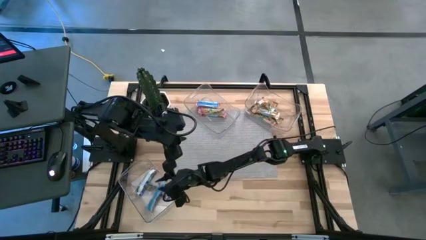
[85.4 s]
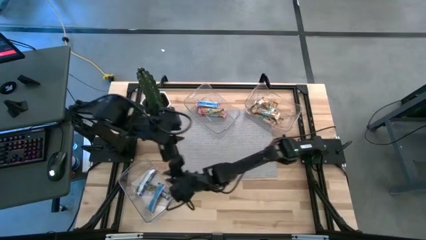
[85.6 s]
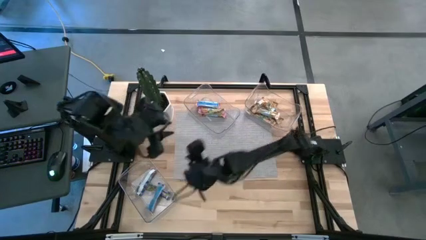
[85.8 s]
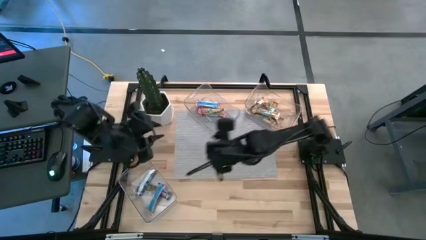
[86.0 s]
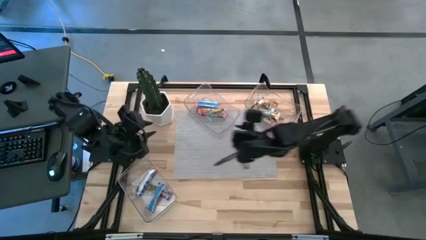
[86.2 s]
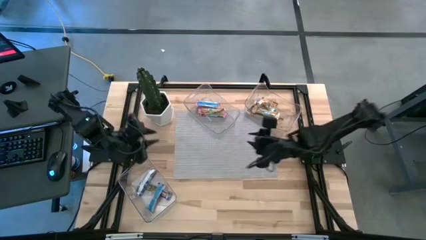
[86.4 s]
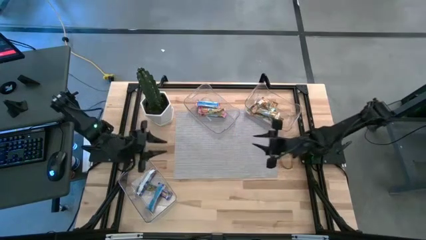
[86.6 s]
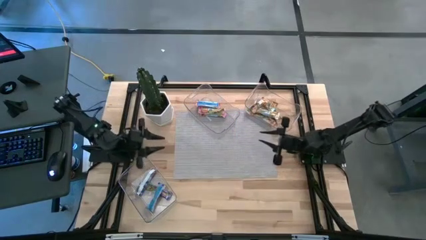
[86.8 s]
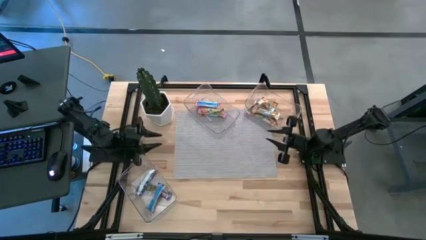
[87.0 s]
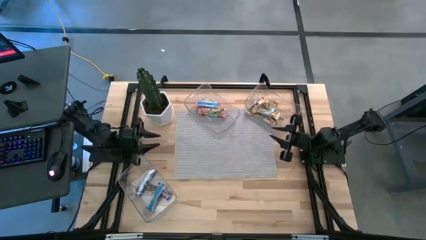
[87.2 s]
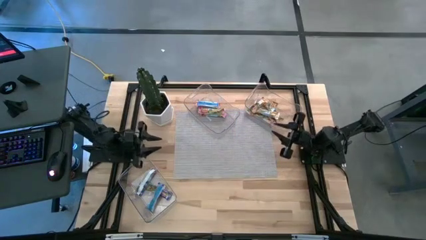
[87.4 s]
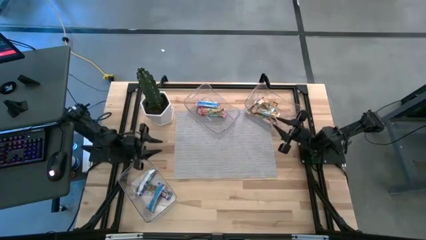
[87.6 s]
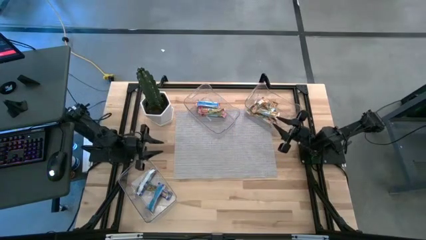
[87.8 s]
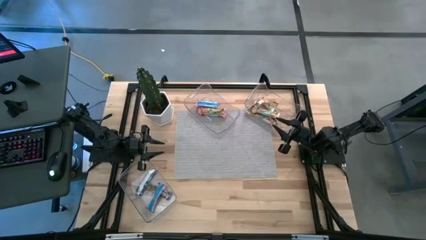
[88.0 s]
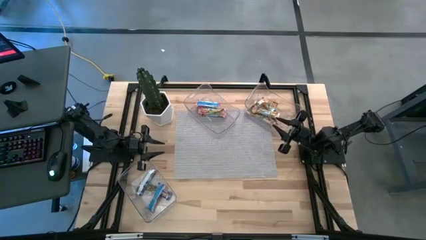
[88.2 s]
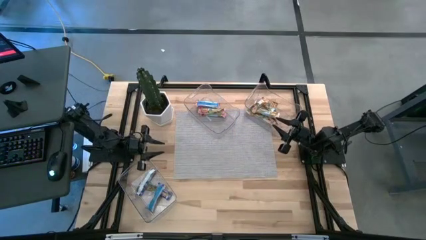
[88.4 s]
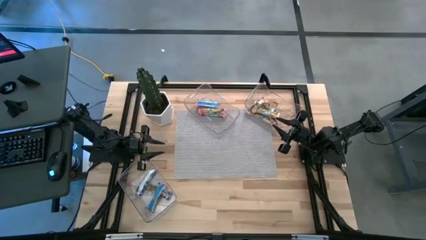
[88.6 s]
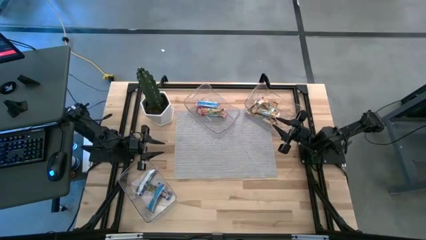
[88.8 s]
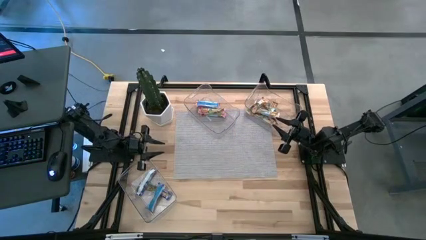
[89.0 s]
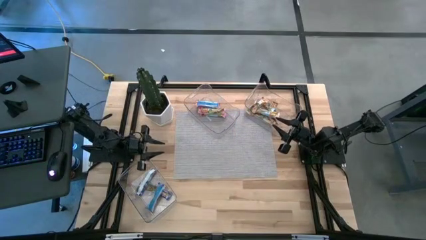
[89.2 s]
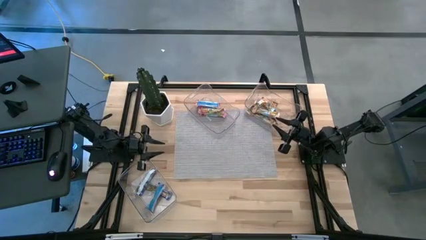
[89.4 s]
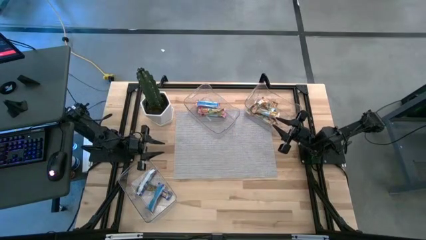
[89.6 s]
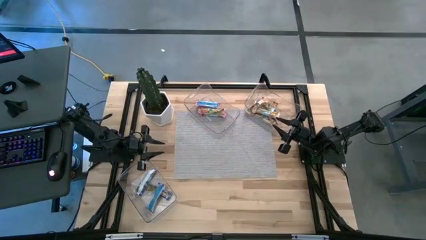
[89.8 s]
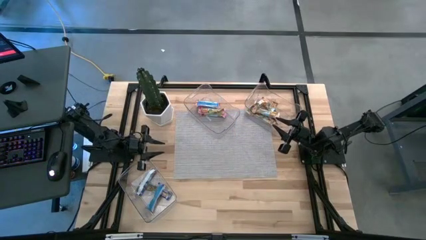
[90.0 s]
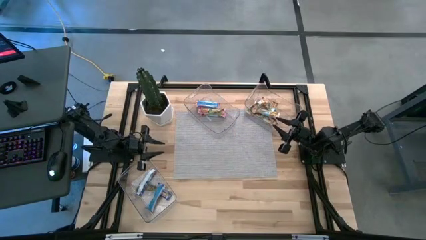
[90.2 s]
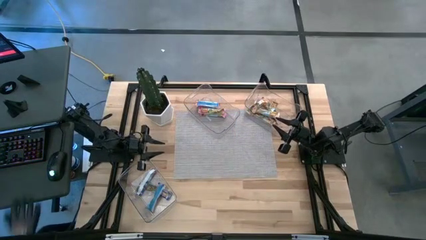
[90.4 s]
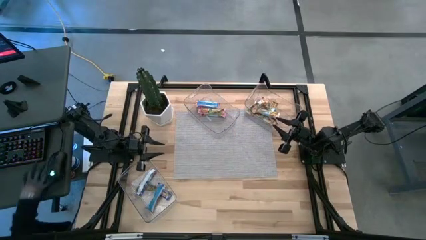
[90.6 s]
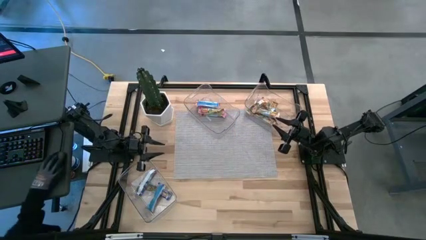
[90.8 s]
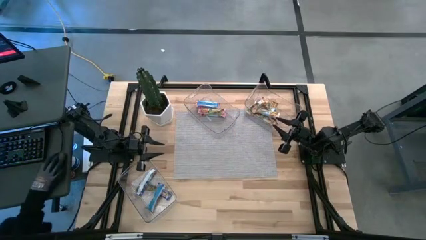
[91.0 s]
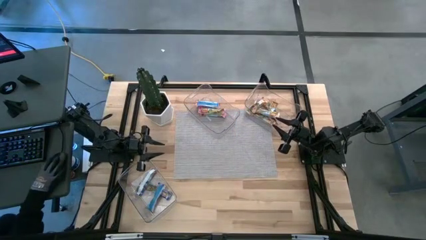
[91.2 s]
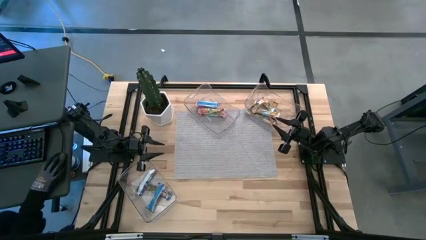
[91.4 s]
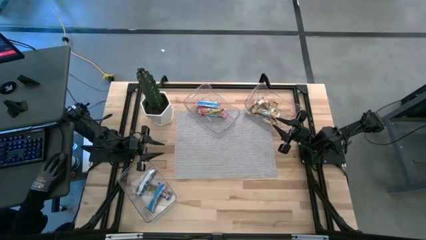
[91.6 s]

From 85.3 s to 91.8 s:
Task: Pick and place Granola Bars by type
Return to Home Position

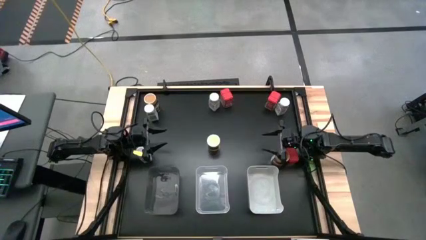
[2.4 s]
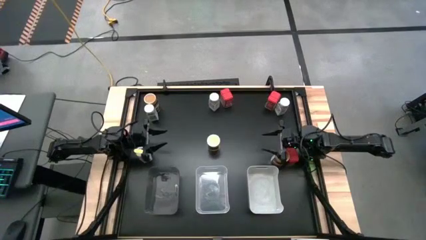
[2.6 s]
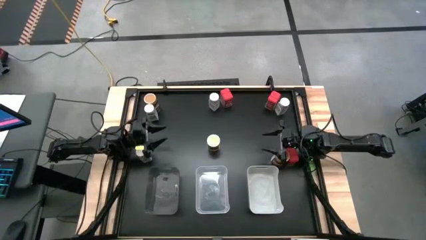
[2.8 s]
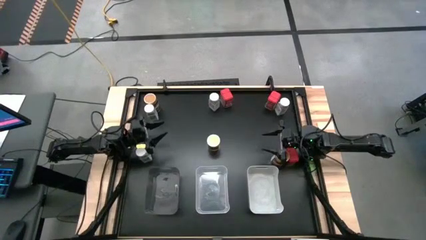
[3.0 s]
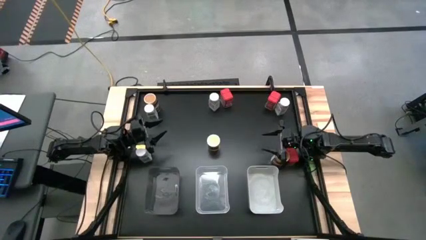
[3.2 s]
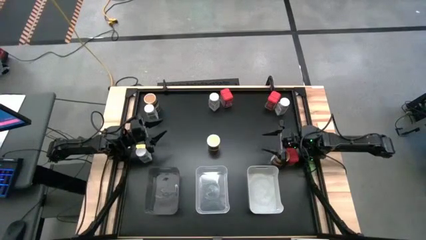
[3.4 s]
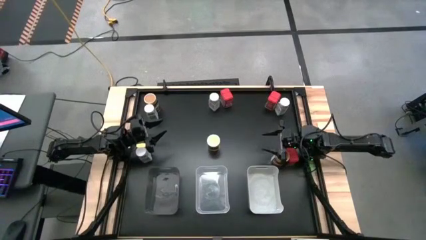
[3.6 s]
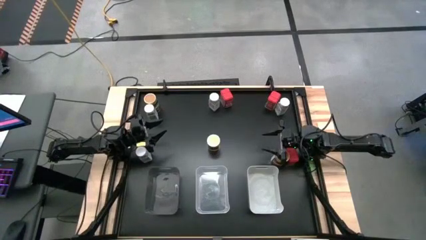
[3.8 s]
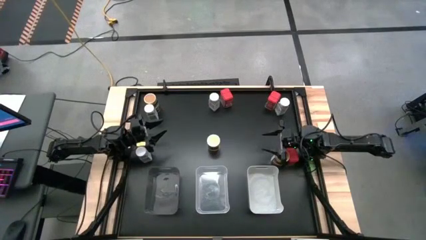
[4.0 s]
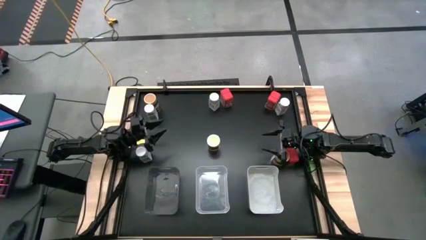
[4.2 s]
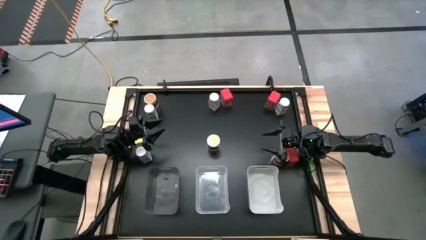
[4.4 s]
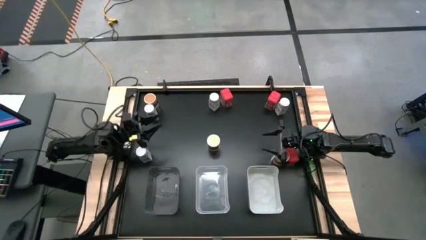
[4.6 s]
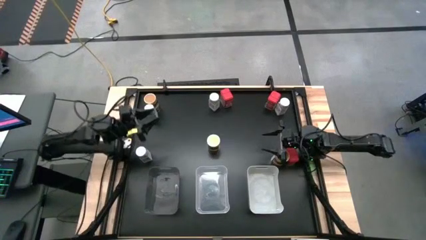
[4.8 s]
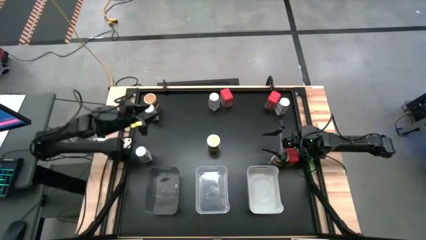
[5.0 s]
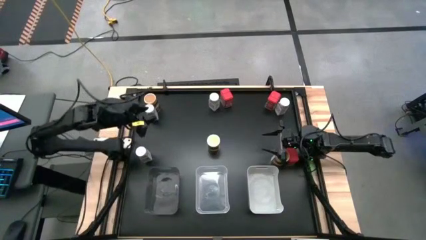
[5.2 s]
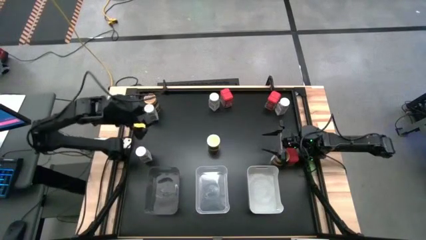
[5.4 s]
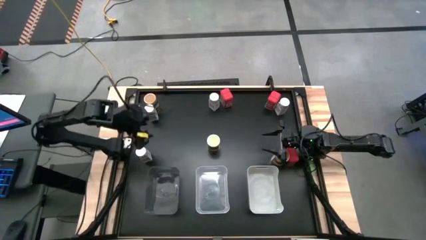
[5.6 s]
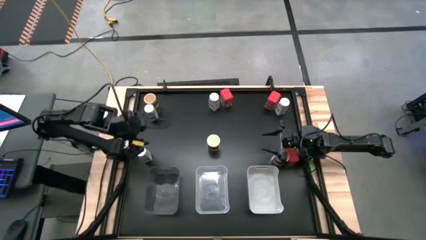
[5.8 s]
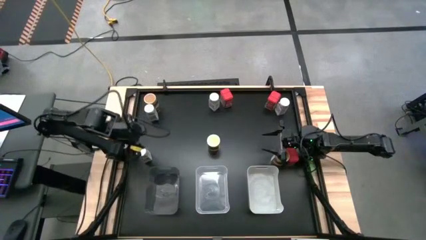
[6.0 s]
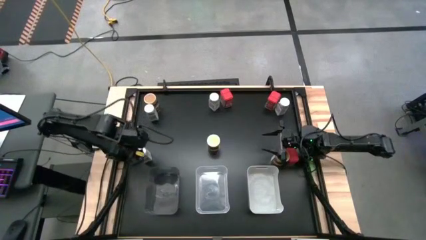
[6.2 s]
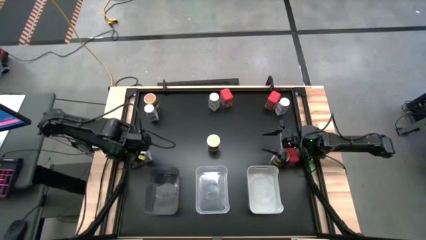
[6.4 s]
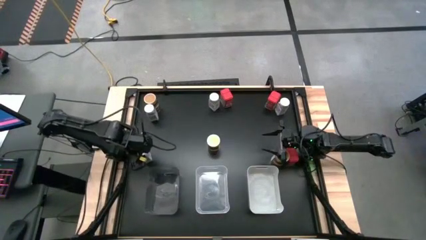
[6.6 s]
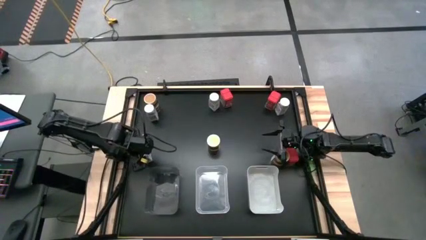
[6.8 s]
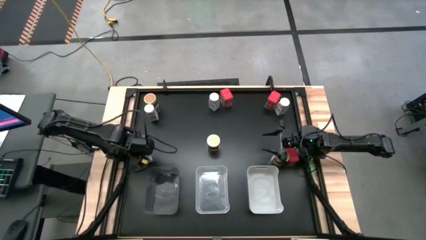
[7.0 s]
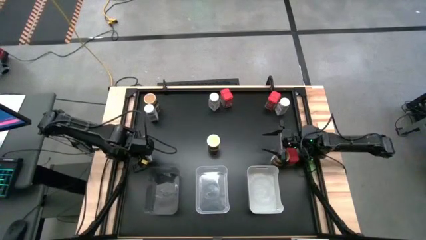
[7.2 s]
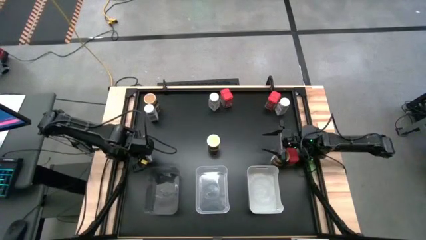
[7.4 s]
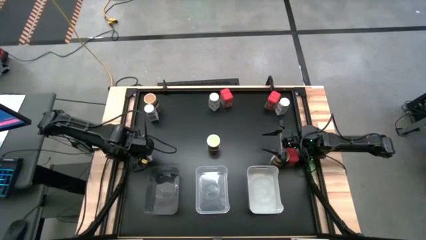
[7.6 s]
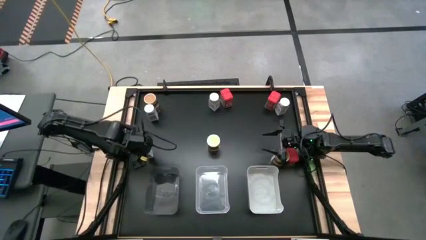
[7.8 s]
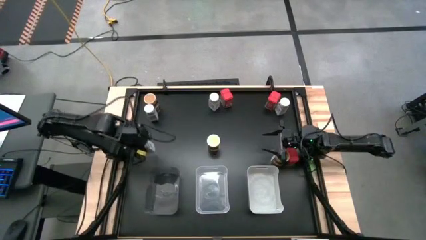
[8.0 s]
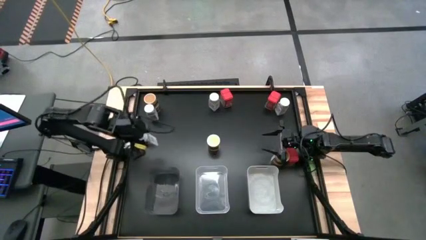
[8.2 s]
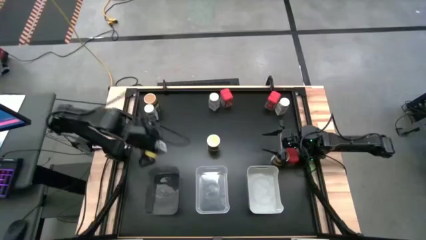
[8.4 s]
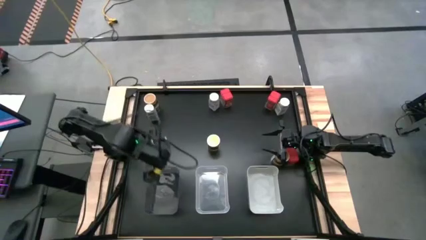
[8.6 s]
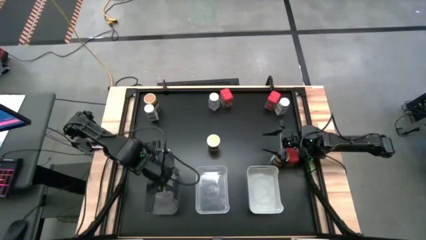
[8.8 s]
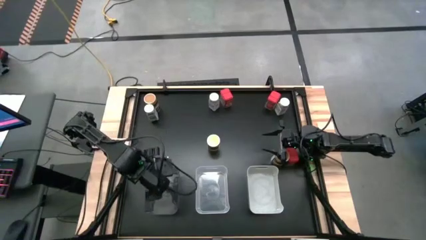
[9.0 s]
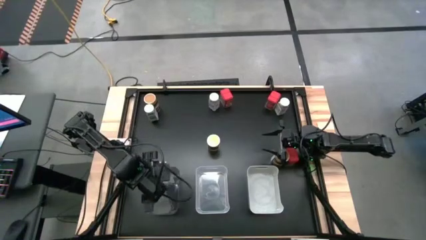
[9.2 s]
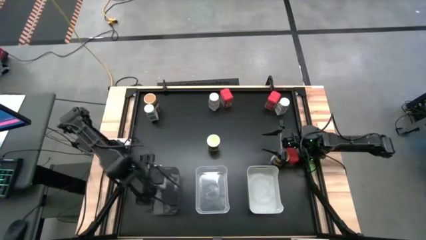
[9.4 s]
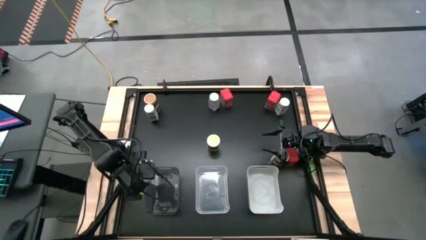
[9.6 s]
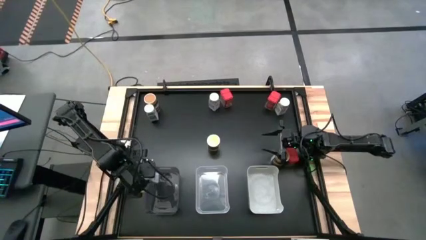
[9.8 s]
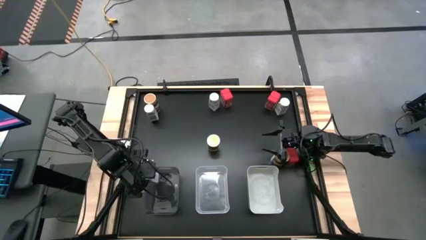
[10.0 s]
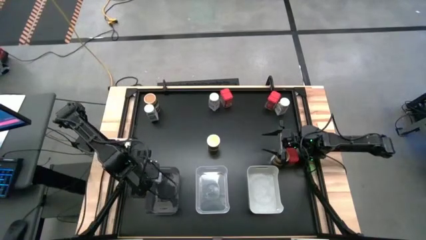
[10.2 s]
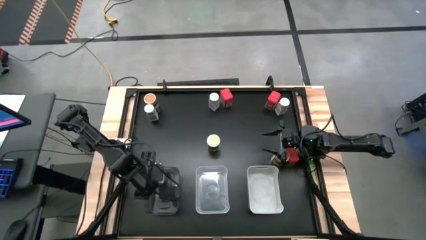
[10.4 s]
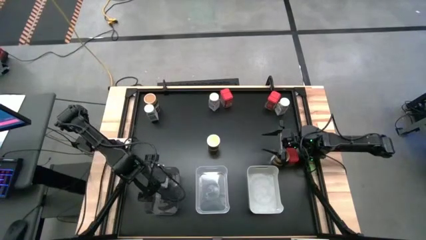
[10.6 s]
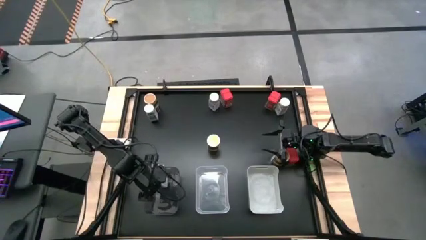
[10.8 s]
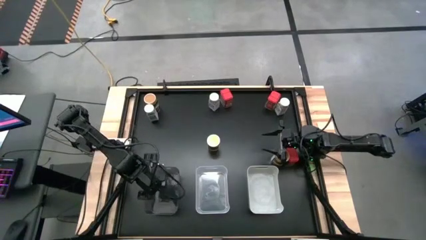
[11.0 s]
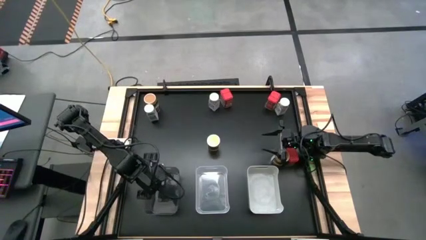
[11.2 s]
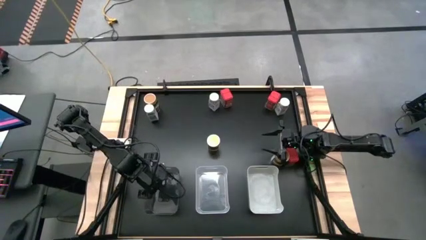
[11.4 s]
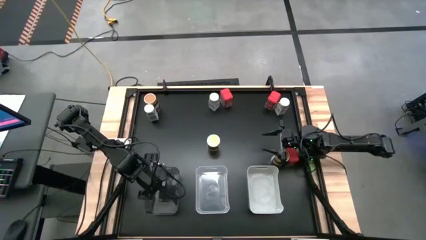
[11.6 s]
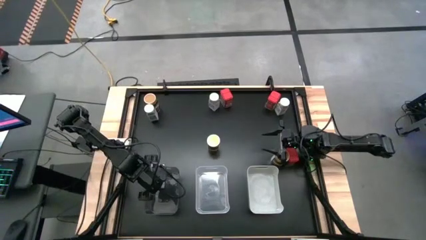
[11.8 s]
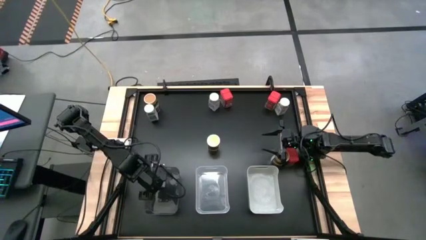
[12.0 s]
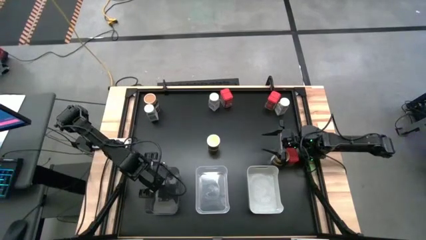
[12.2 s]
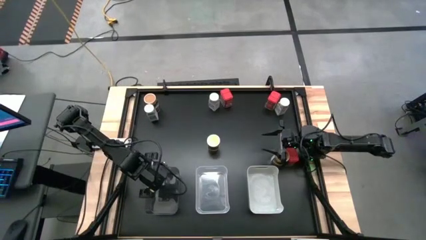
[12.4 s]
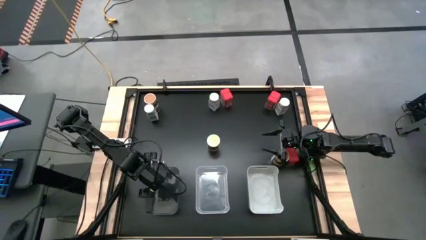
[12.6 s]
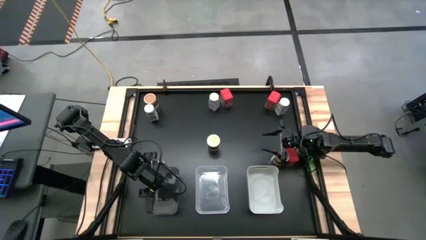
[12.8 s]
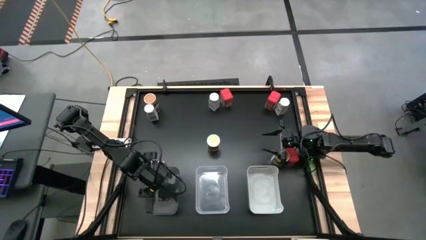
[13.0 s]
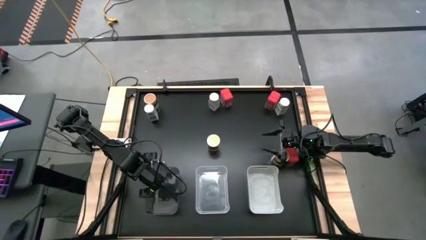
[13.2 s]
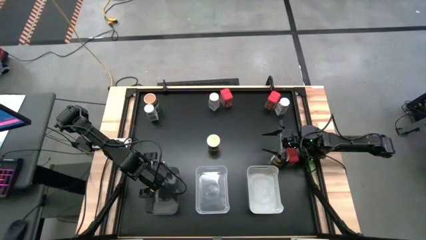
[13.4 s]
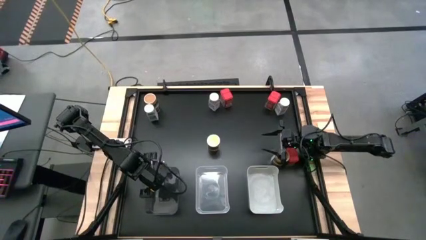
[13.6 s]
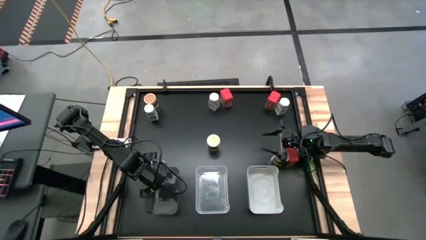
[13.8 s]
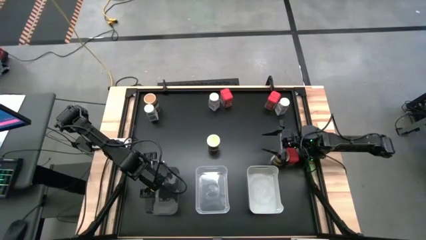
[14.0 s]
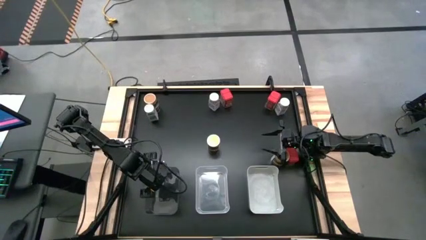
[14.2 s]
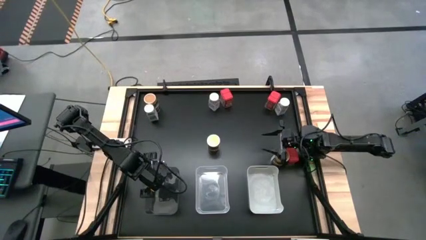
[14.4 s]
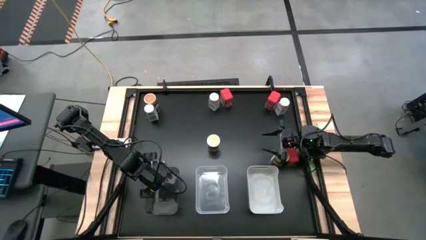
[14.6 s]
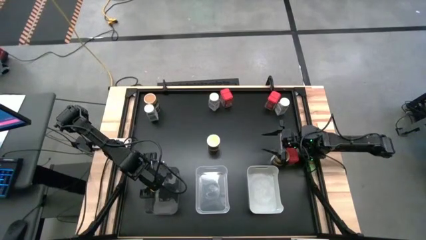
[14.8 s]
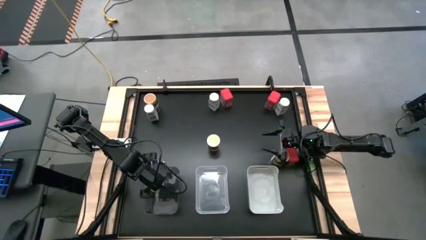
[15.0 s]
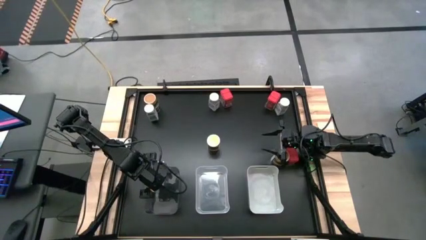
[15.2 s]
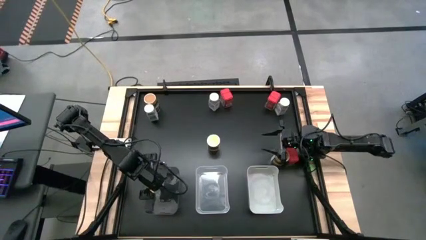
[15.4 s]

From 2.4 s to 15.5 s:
Task: Sort spices by type
Put the bottom left white seasoning bottle into the black bin
